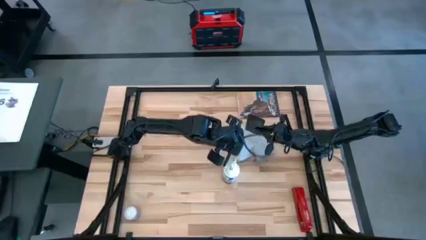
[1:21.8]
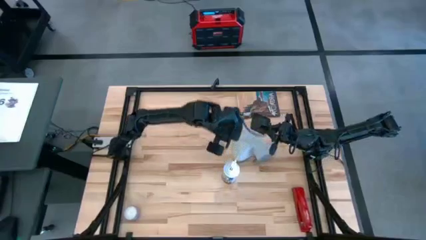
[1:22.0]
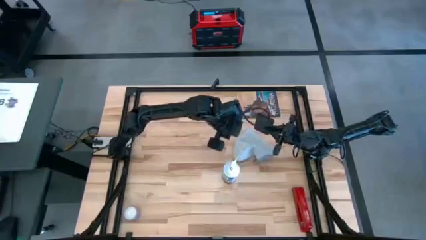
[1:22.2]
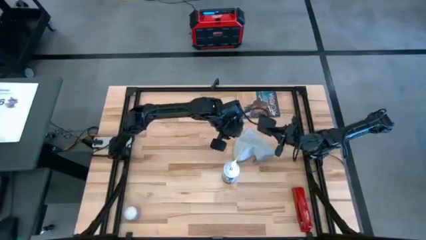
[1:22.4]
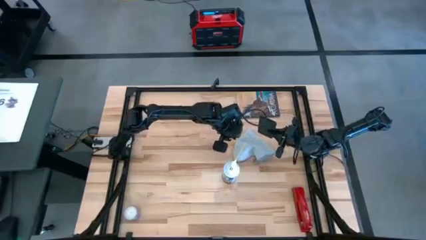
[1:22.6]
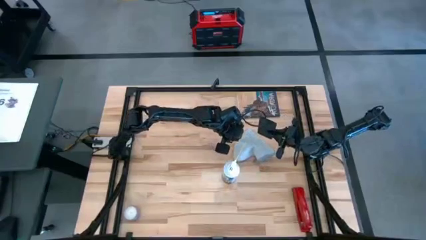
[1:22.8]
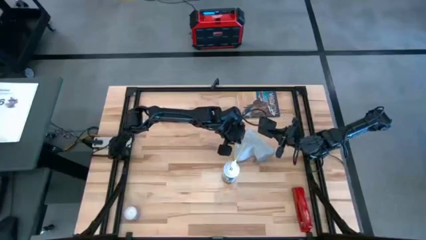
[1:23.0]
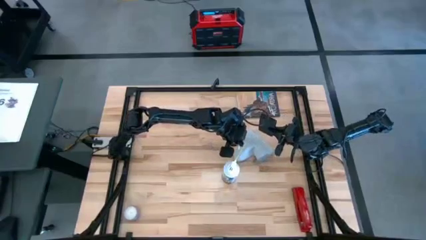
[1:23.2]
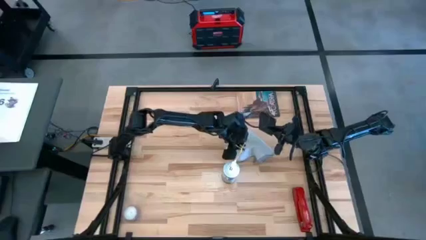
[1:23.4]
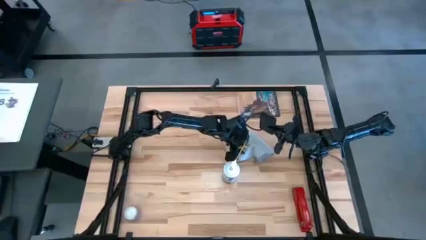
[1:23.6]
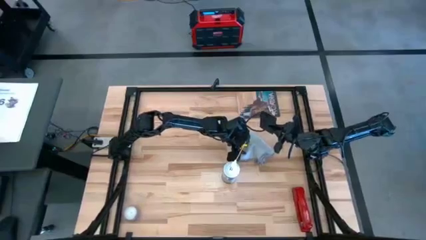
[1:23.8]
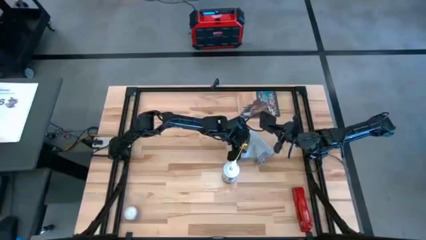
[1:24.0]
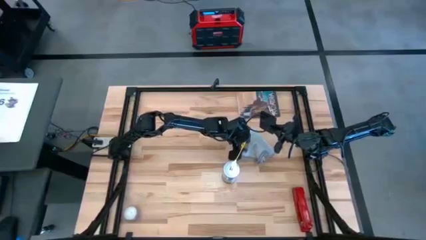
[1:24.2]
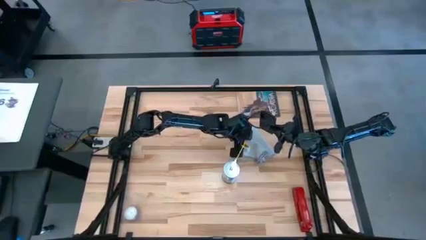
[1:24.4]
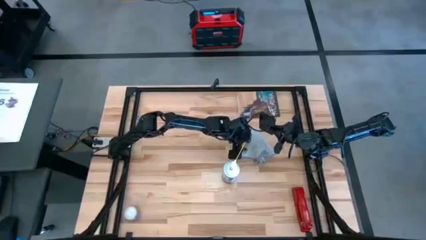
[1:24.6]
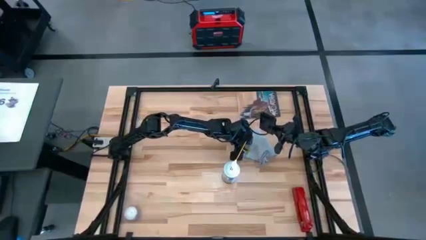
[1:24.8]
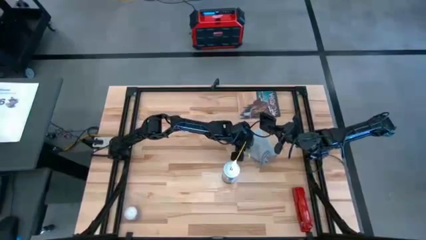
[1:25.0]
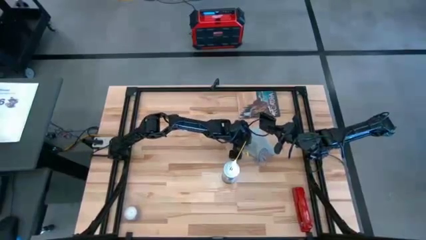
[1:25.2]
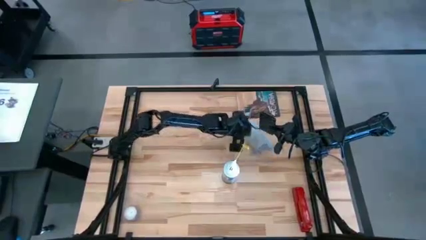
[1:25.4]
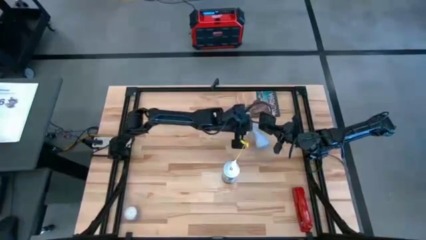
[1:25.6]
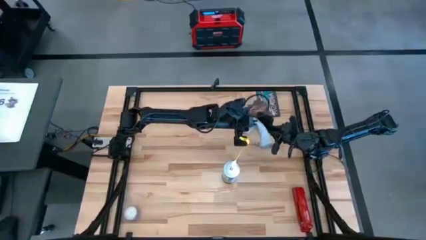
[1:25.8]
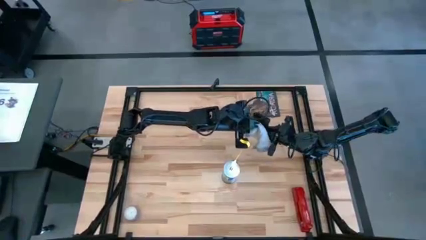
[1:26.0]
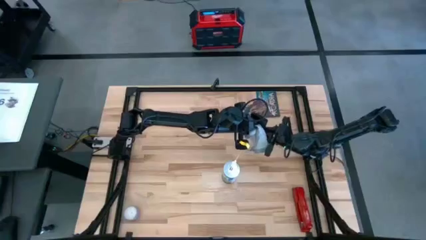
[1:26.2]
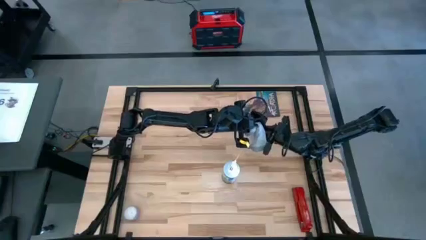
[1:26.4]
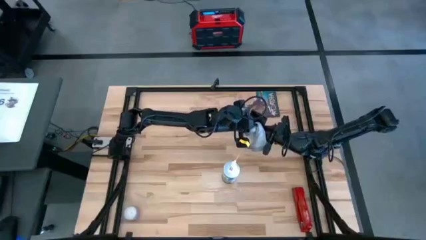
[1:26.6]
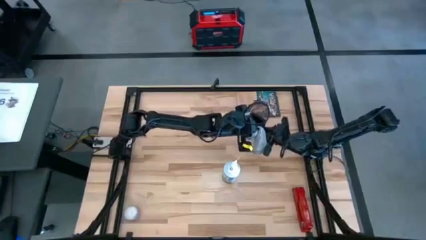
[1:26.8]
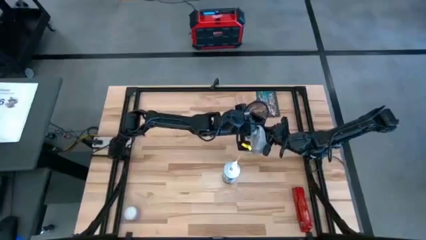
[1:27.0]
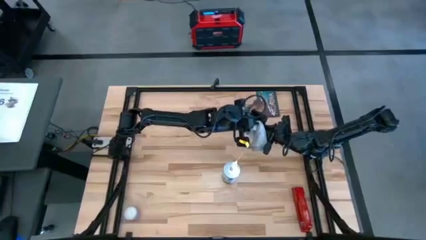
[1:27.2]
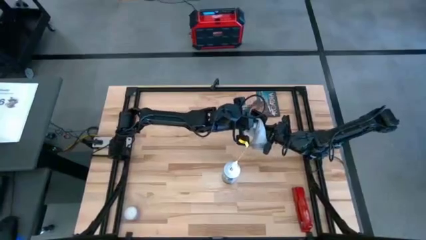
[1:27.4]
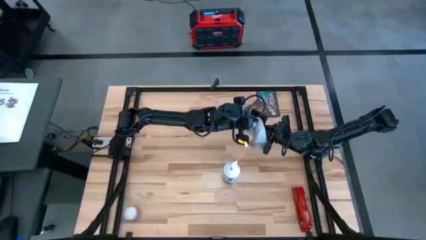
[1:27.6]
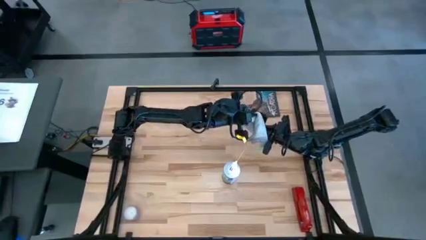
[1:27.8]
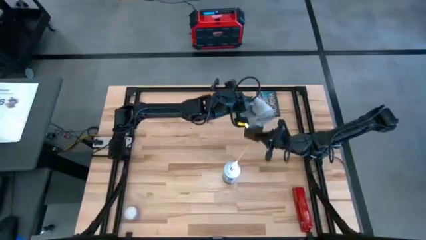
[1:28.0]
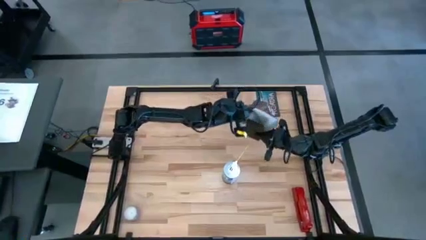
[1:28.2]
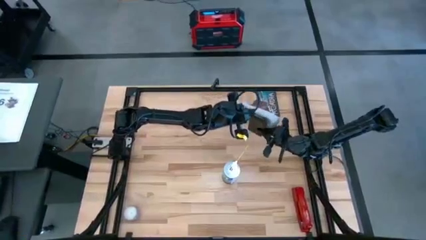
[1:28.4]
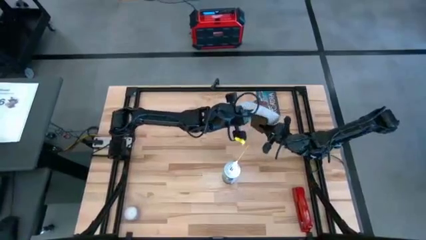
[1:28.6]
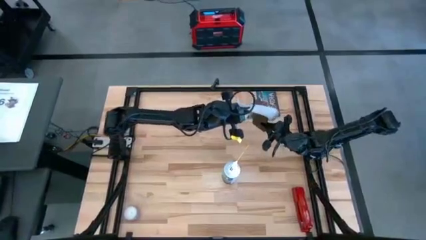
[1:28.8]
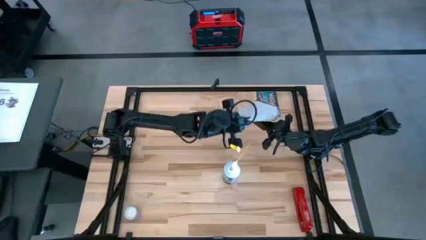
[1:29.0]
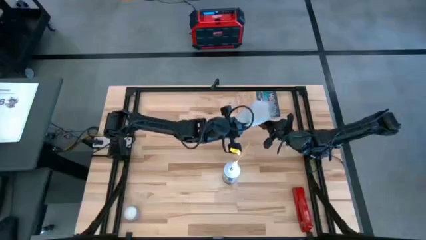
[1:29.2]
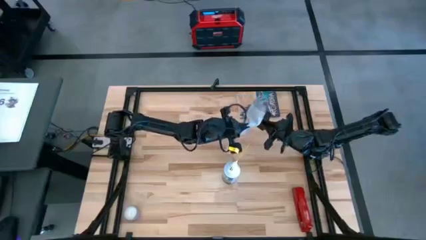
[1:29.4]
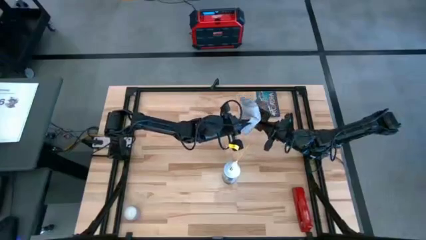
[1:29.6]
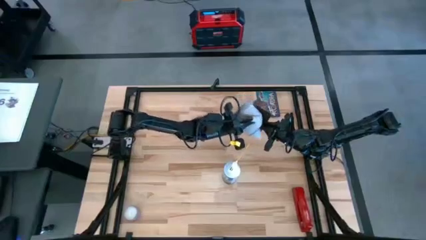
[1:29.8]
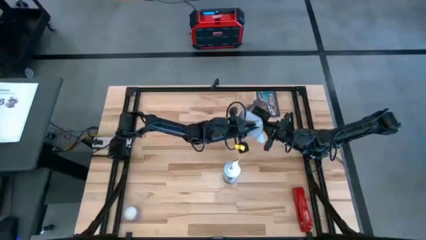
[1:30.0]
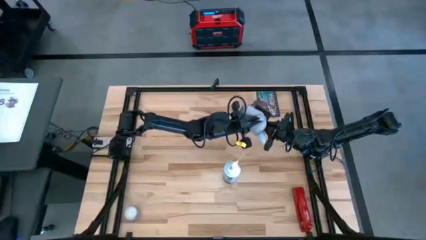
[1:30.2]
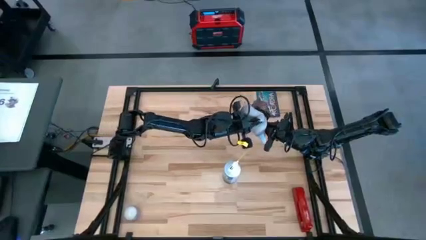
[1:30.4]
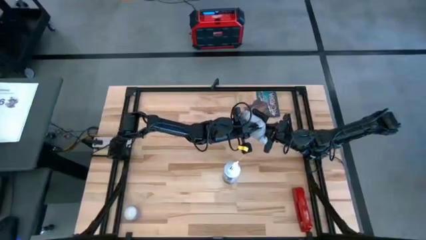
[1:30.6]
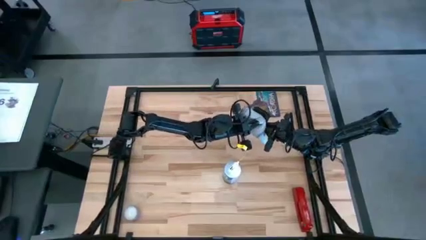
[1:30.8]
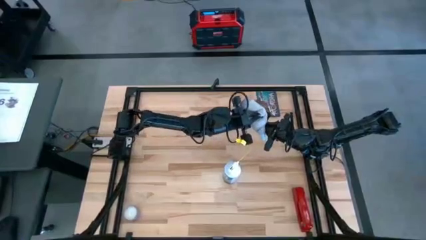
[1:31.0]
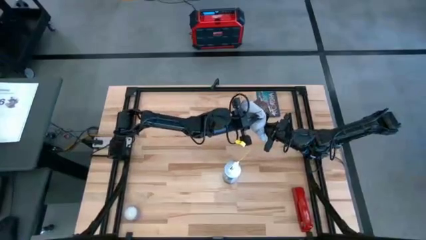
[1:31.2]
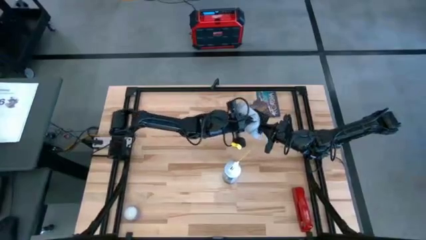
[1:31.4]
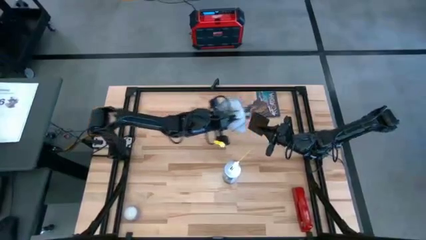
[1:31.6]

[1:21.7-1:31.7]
Task: Apply microfiber cloth
Wipe the back of the black cellphone with the gray microfiber cloth

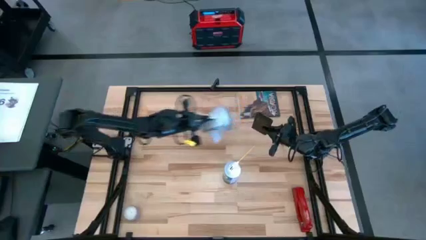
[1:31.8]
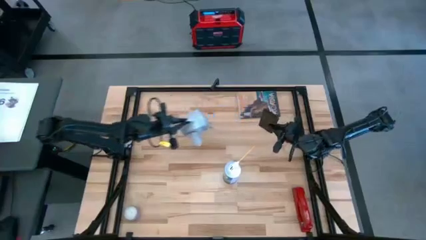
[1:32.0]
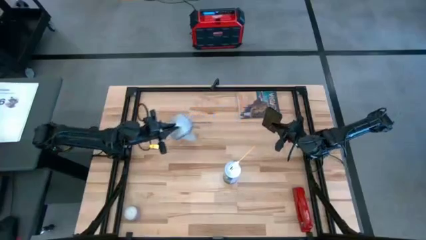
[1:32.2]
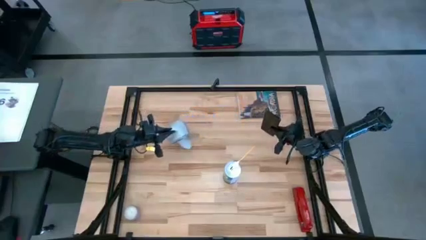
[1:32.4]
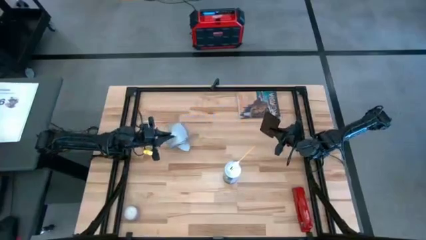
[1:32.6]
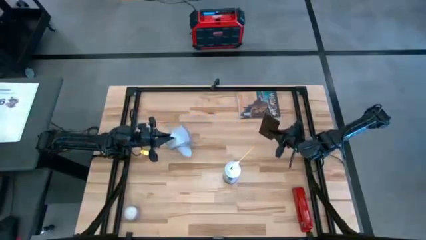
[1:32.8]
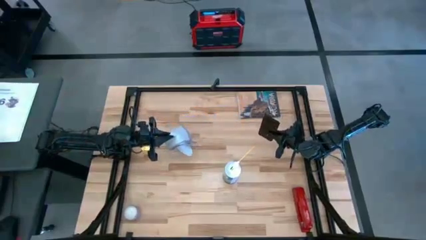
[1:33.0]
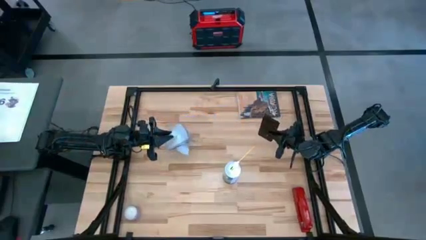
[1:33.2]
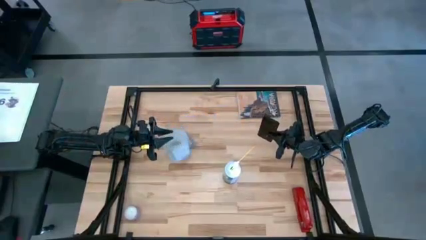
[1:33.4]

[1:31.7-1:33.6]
Put the microfiber cloth on the table

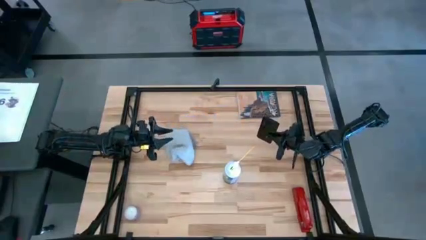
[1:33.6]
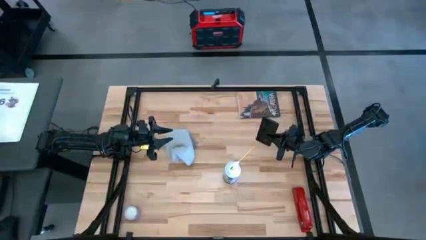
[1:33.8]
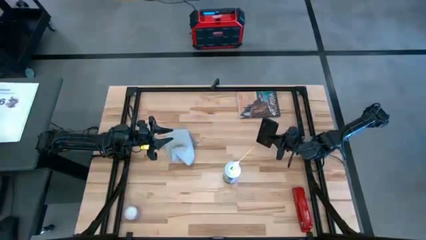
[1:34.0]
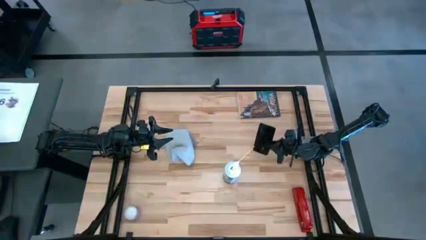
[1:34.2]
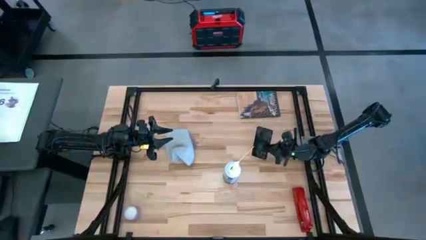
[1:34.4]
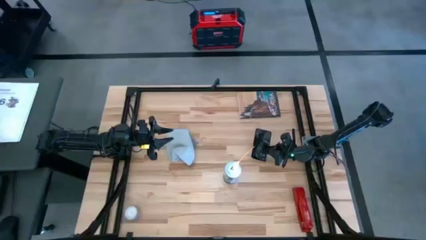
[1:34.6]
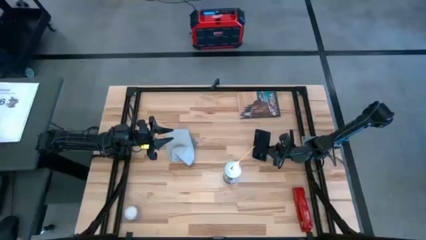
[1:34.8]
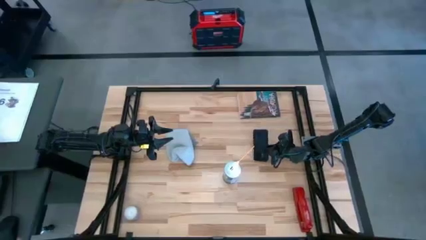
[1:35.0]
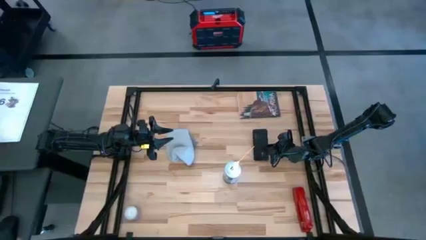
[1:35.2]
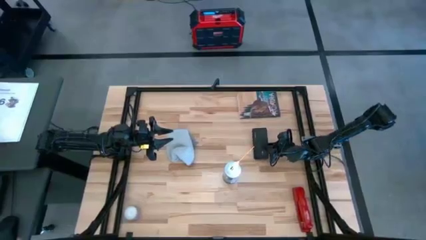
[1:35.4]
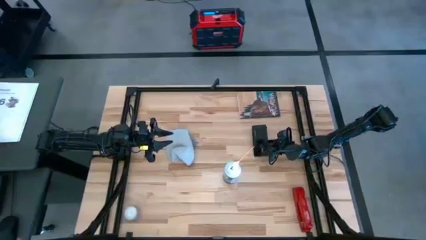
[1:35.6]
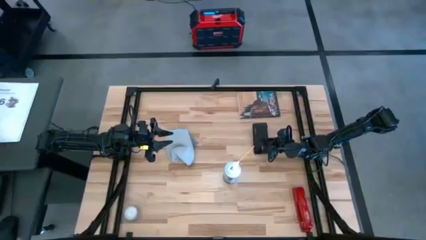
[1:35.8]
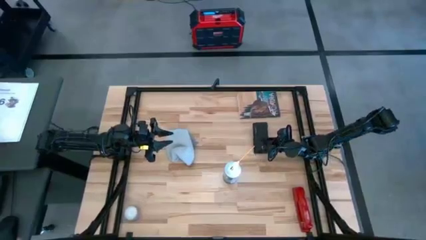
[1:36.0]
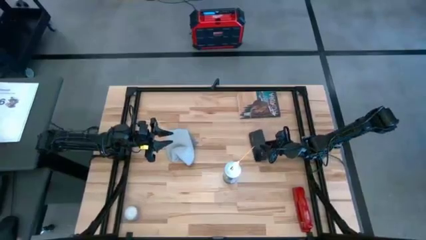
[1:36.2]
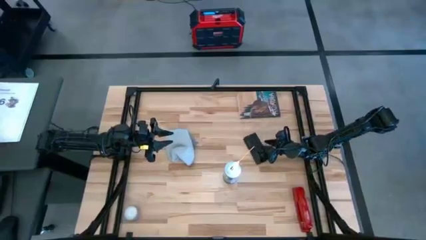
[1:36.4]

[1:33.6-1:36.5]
Put the cellphone on the table

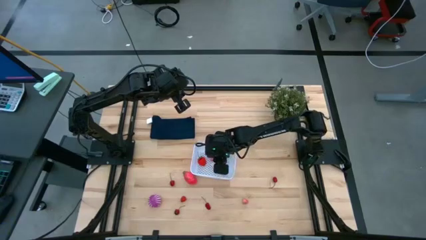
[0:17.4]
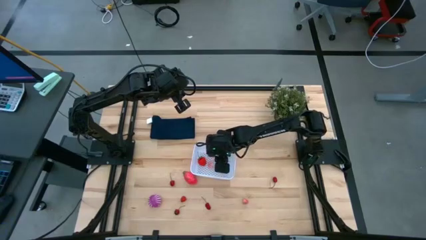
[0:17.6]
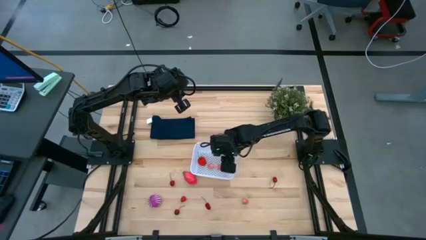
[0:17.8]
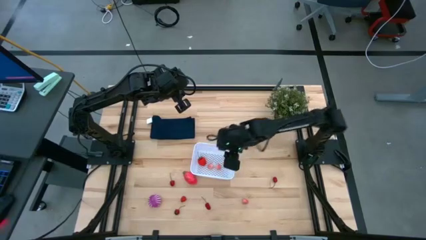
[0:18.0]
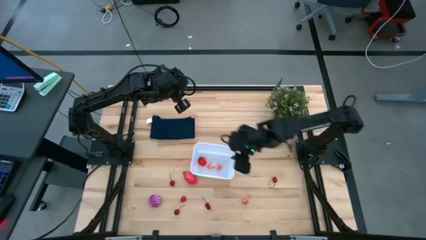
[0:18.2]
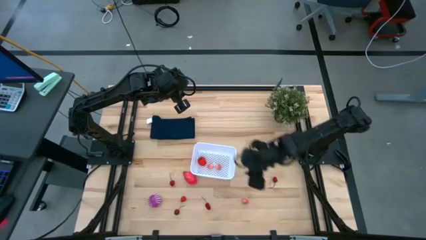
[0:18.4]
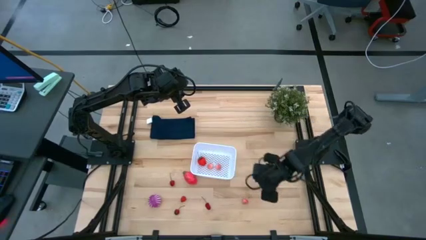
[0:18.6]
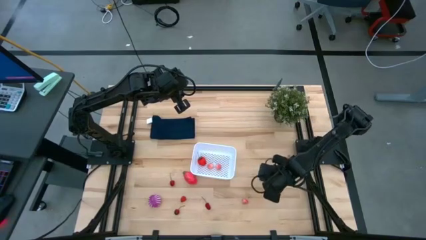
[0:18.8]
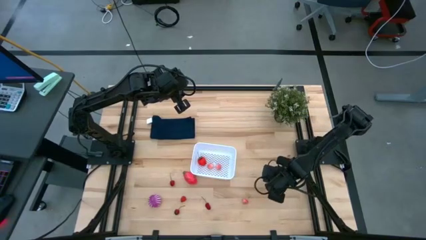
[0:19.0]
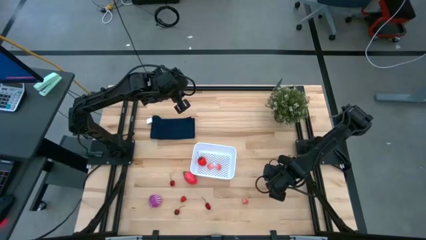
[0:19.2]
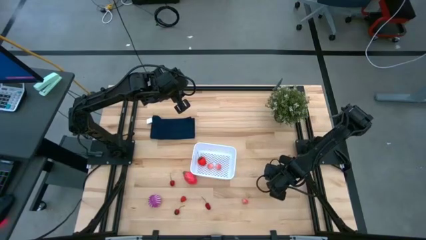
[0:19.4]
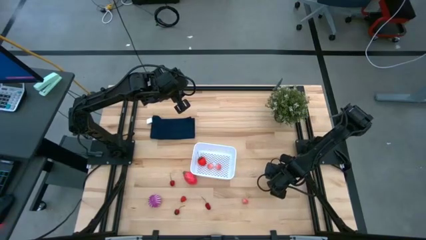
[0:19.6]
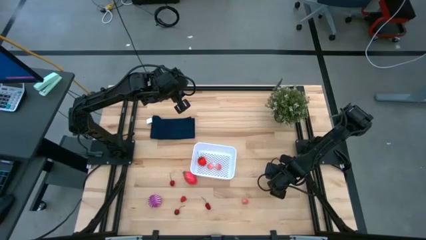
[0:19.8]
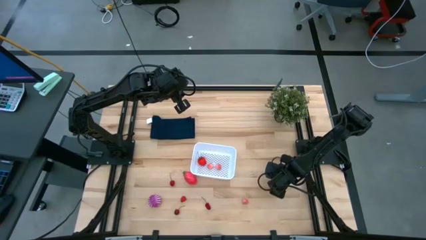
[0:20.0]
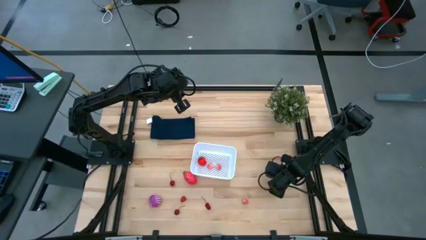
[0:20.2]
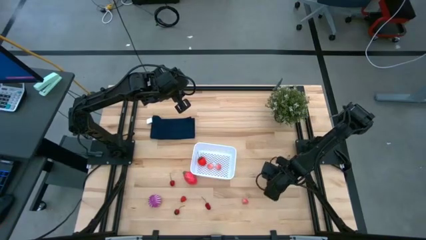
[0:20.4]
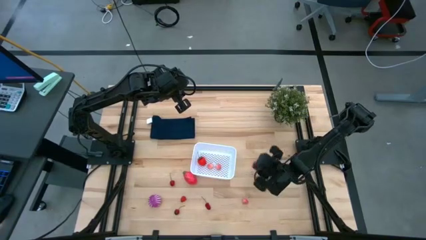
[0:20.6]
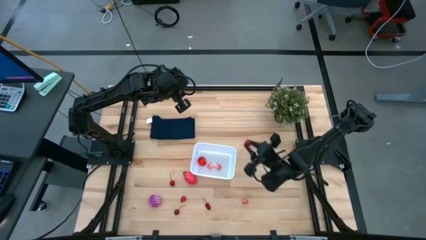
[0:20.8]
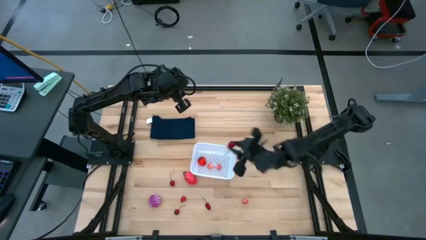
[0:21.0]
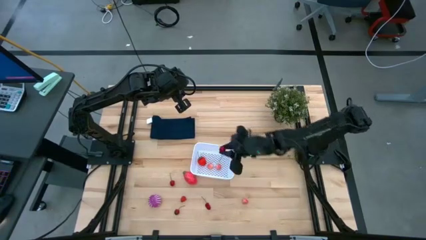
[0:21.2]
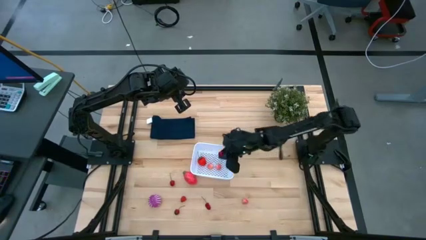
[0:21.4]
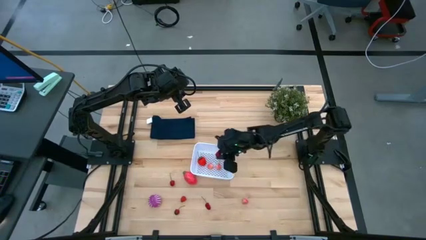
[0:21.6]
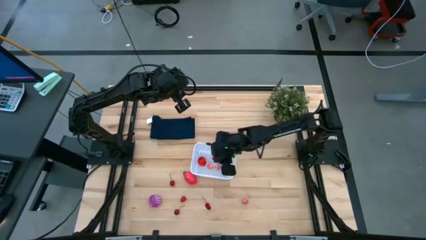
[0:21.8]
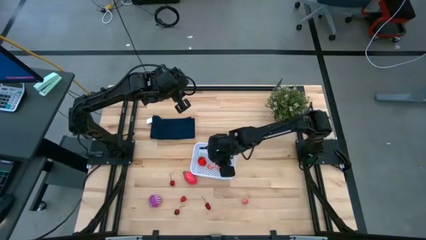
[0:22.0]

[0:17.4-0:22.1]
Task: Pick and placing Produce into tupperware
Put the cherry into the white bin
